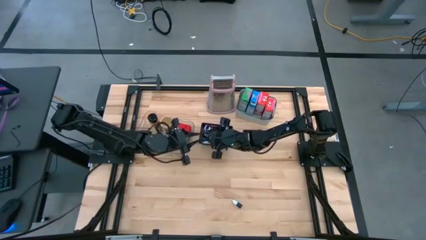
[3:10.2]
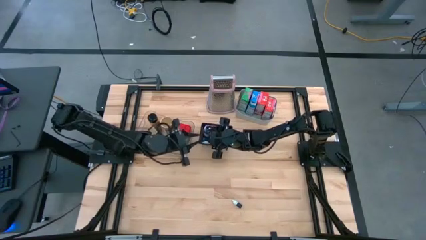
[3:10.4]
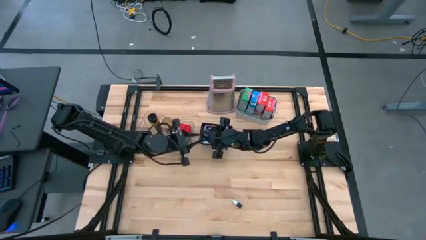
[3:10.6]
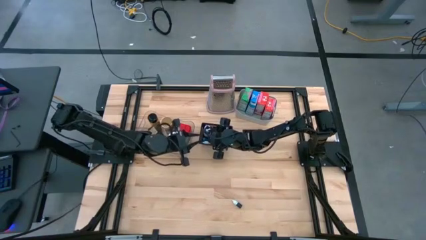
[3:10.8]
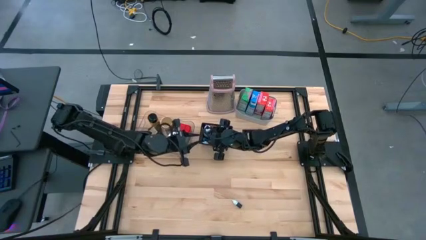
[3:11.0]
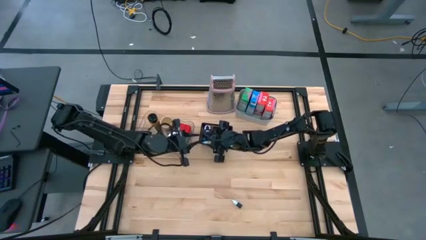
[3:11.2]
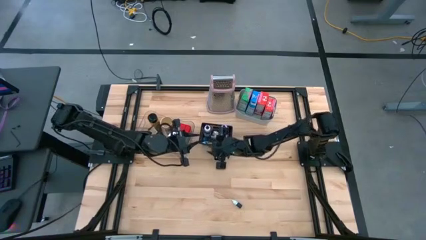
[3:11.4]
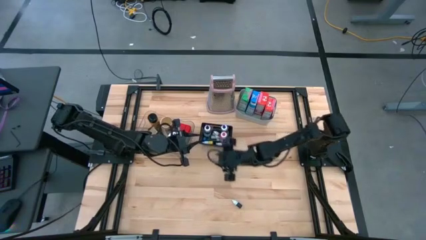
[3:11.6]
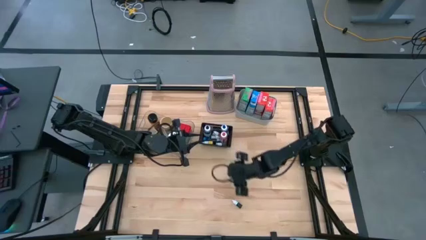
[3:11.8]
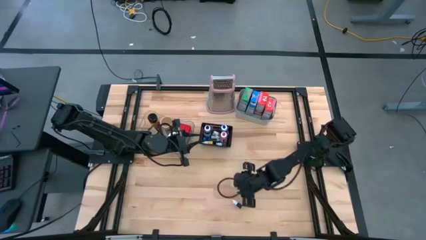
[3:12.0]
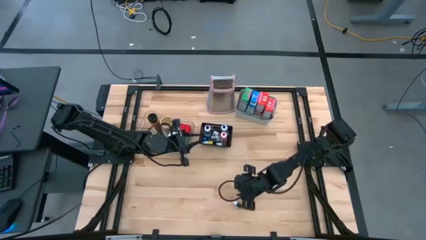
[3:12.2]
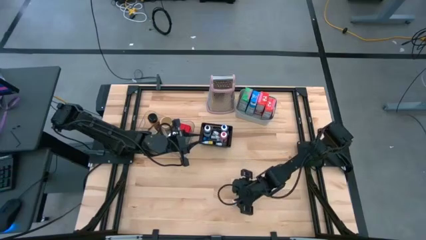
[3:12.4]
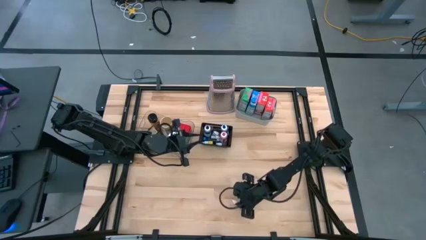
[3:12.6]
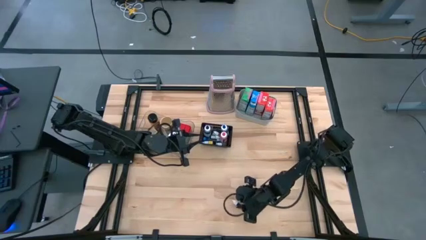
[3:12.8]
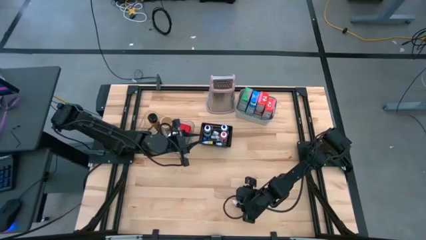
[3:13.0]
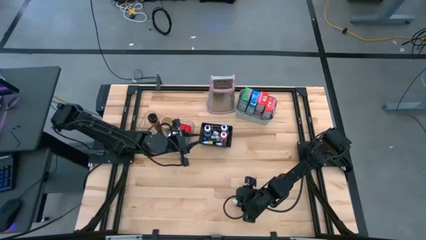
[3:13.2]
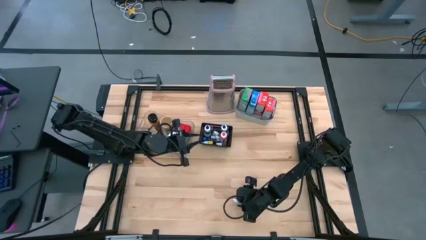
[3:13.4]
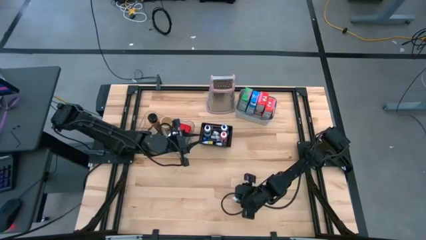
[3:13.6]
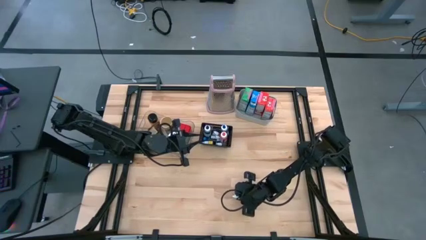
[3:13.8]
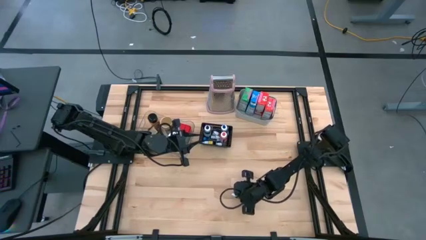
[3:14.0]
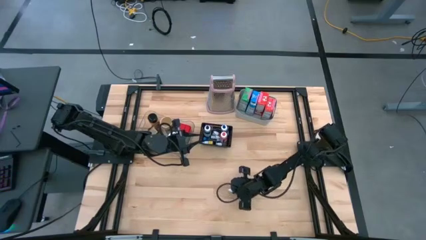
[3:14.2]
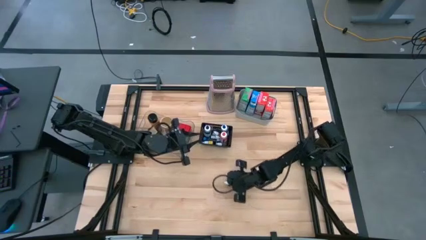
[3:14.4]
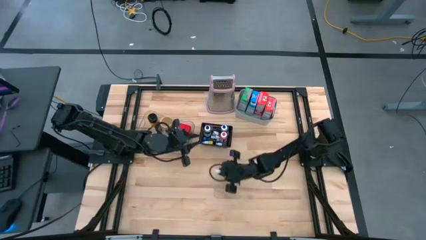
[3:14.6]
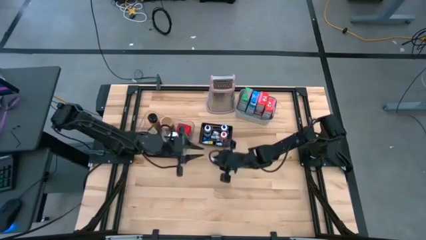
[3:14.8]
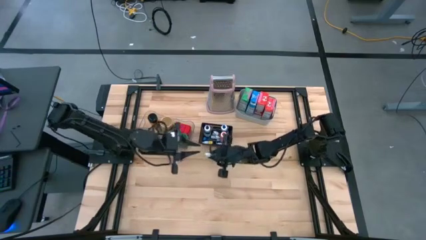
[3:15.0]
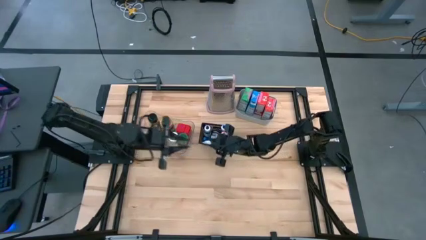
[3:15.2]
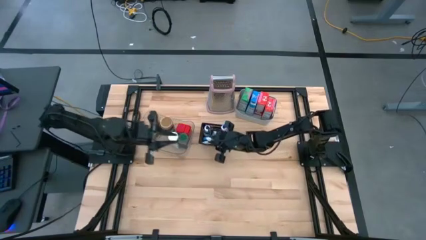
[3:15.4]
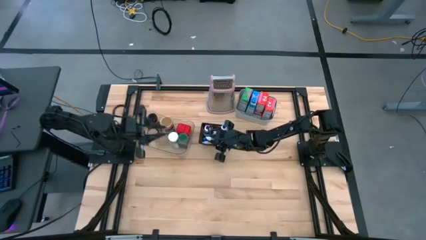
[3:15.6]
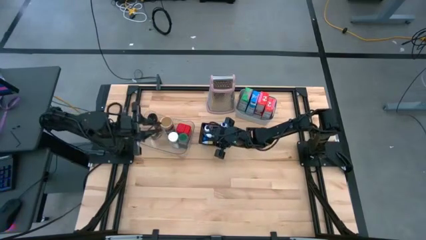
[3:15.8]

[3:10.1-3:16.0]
Task: Pick & Place Kitchen Items
Put the small green food coloring bottle into the black bin

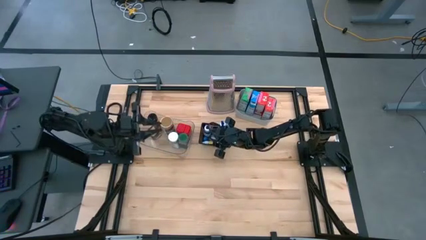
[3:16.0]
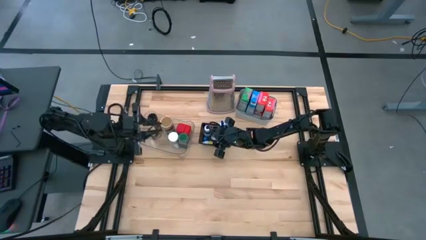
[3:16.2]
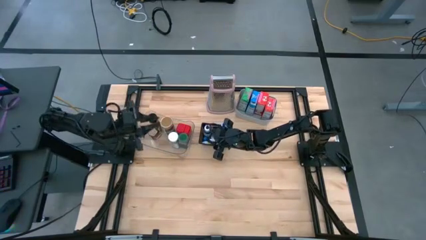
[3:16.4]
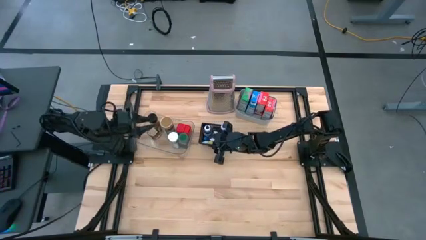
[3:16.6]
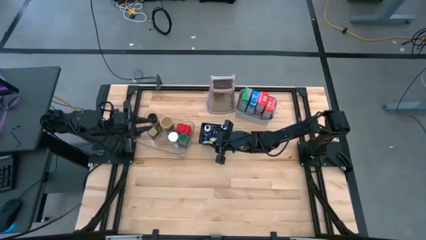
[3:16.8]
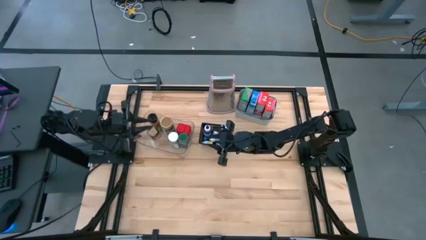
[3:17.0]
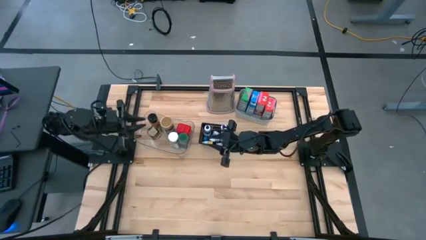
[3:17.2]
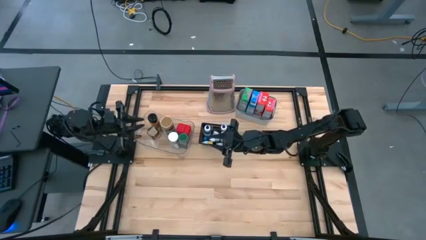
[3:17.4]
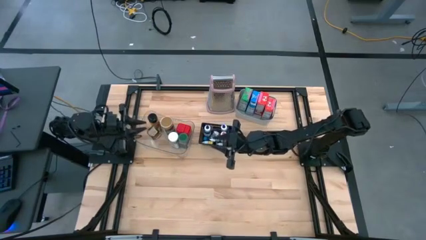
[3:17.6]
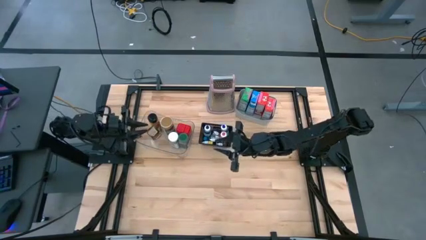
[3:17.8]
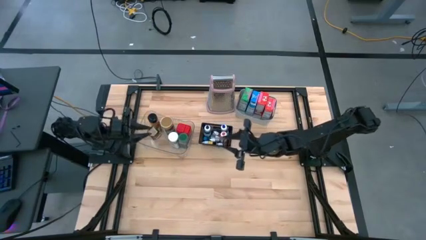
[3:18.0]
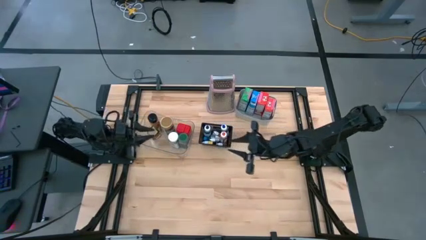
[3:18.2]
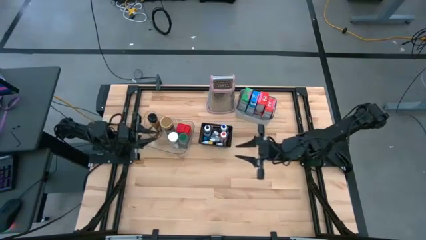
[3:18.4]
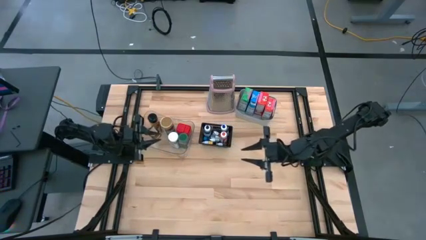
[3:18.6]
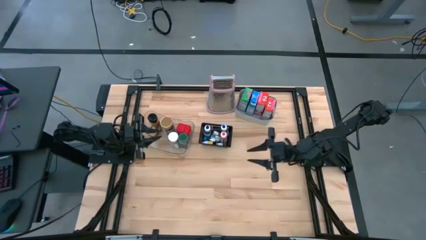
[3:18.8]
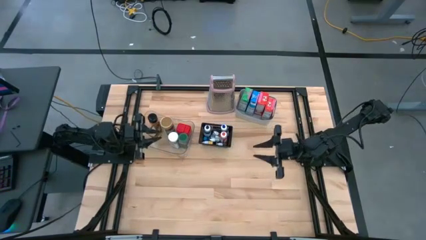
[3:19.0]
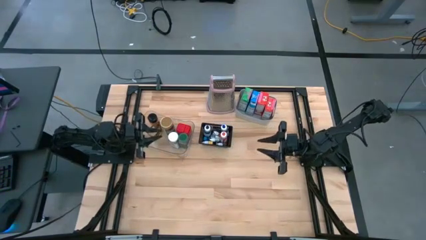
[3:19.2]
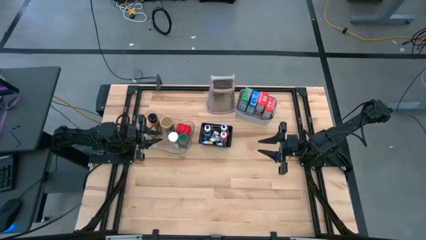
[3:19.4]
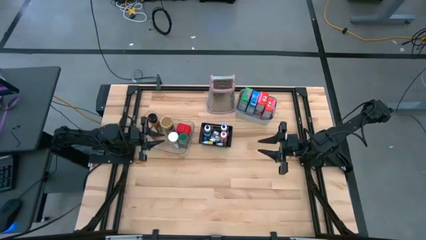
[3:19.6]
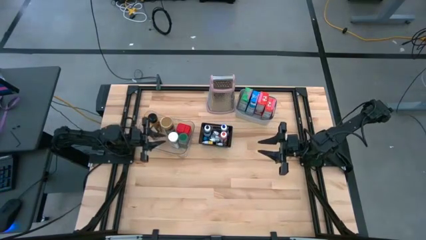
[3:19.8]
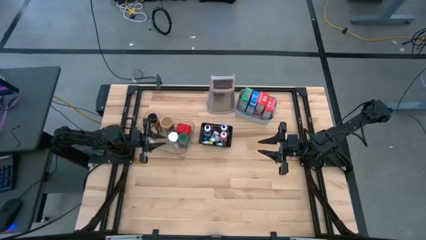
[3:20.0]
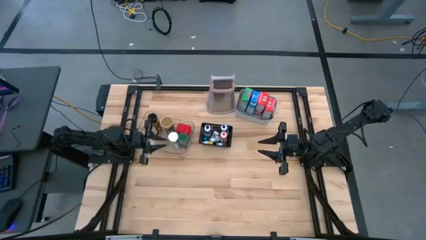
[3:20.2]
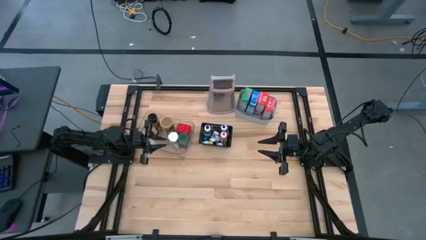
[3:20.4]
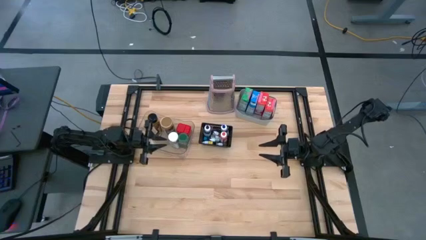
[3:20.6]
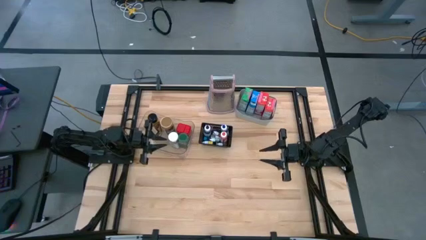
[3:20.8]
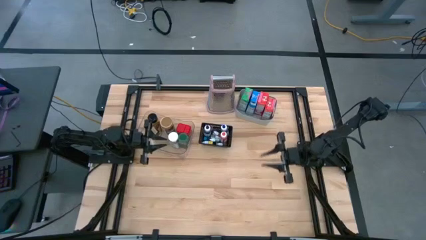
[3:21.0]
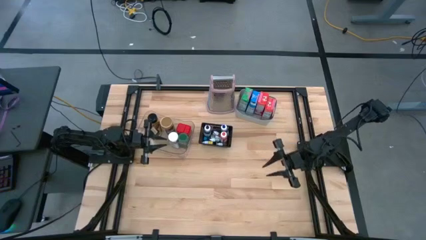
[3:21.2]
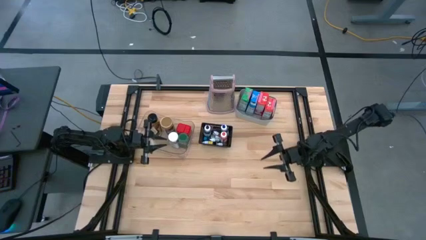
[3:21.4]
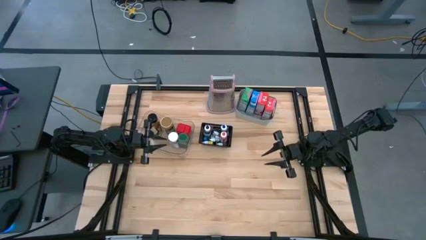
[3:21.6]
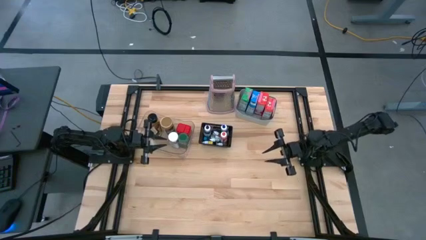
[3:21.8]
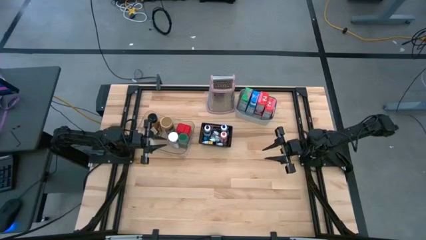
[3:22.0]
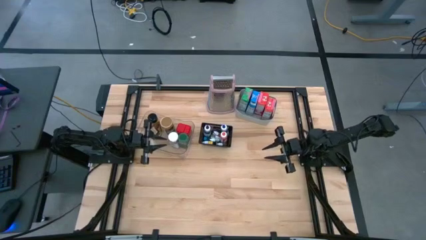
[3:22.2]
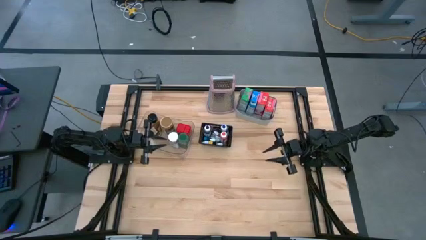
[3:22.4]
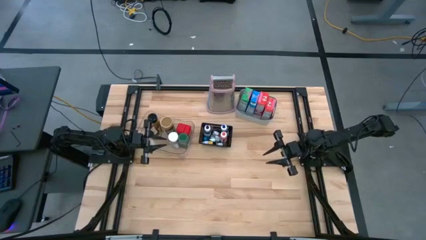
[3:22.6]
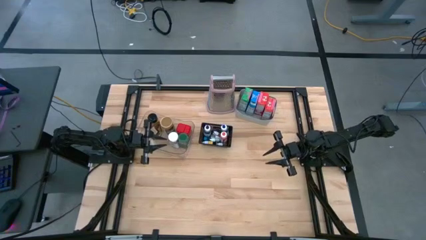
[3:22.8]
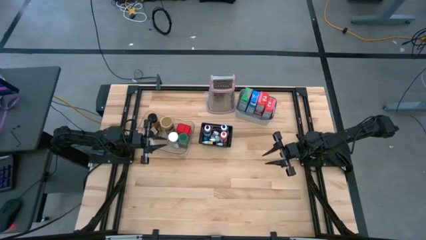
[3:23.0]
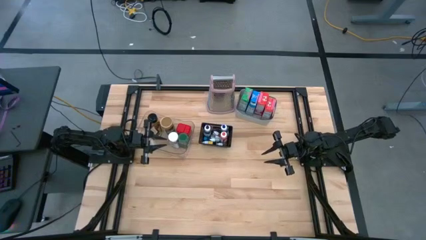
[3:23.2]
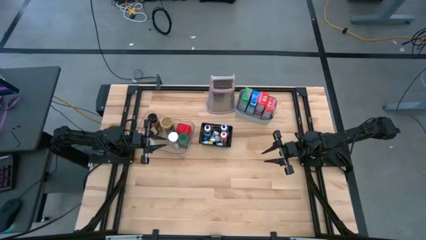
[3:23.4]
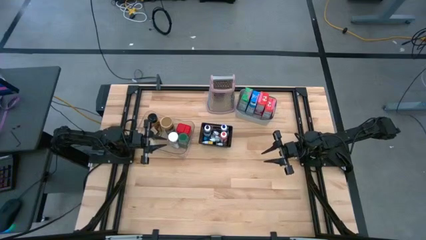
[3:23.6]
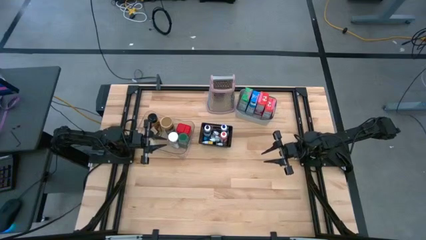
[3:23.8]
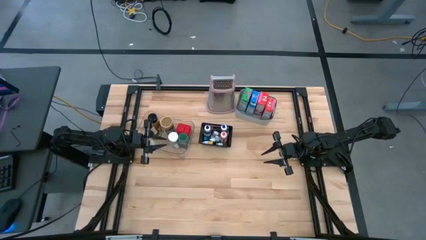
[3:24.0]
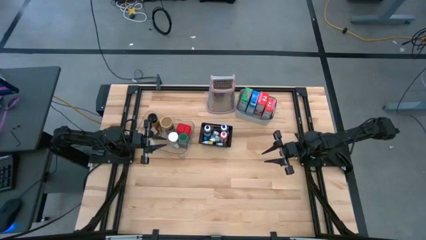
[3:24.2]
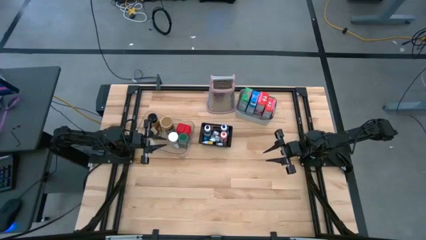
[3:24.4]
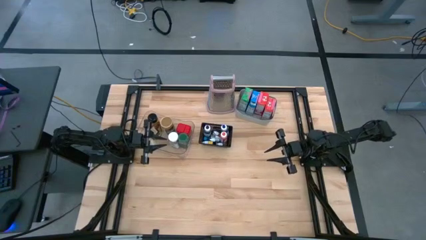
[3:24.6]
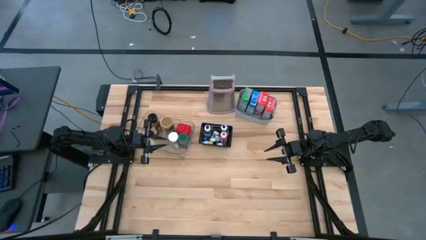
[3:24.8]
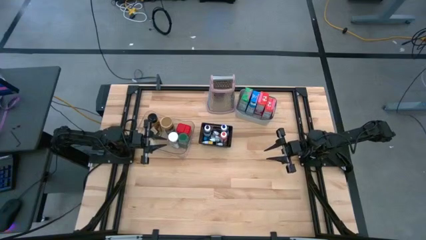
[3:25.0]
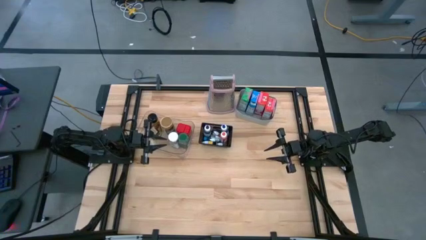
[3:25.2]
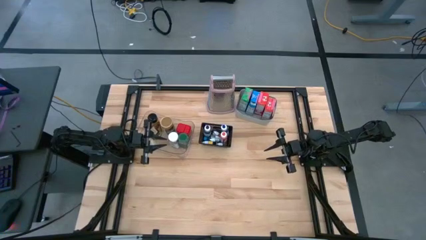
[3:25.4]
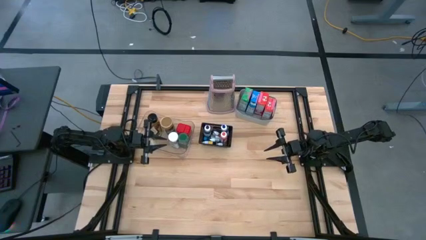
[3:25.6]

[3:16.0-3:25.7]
Return to Home Position

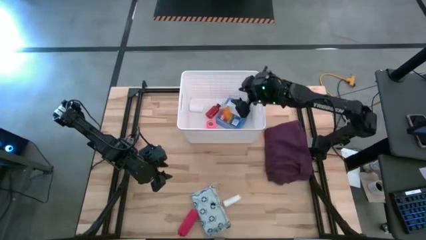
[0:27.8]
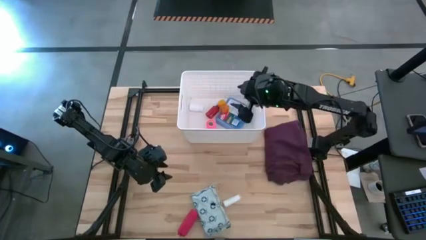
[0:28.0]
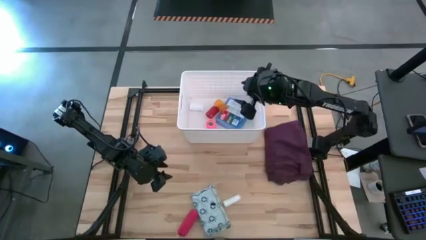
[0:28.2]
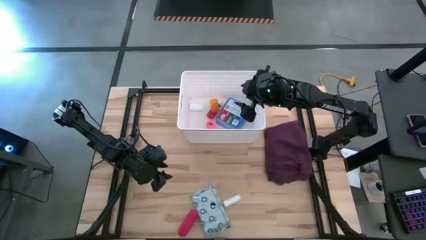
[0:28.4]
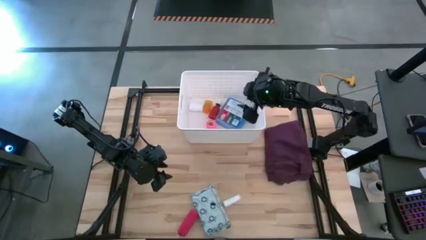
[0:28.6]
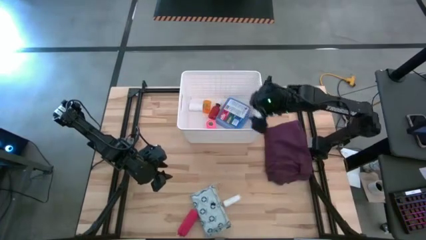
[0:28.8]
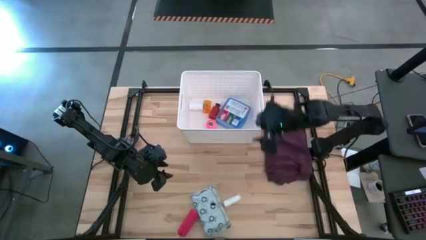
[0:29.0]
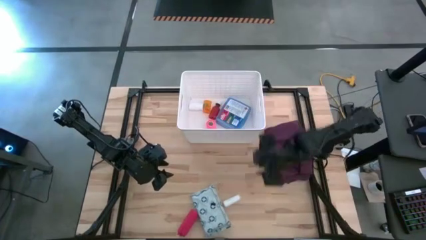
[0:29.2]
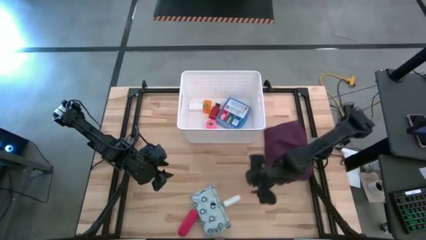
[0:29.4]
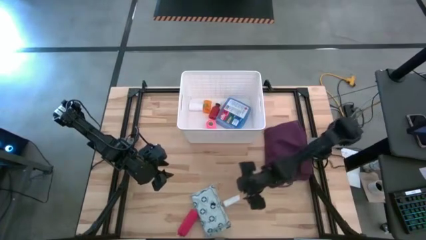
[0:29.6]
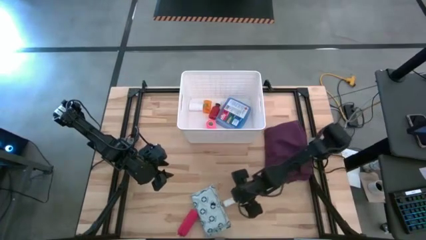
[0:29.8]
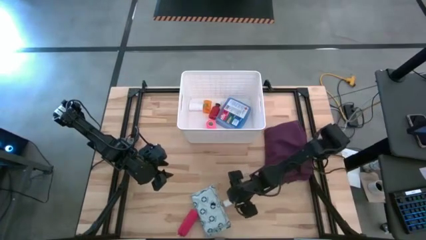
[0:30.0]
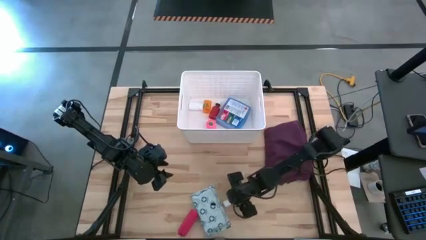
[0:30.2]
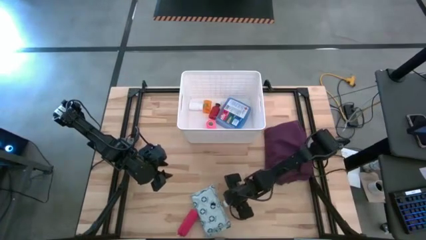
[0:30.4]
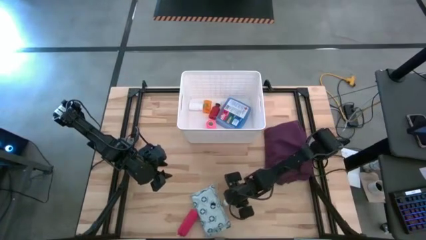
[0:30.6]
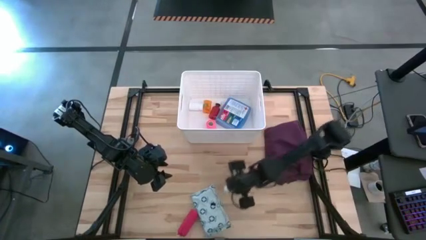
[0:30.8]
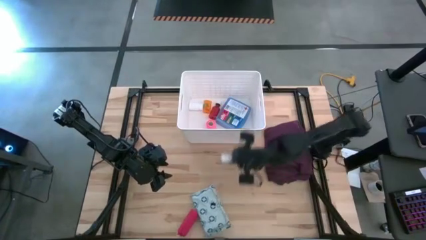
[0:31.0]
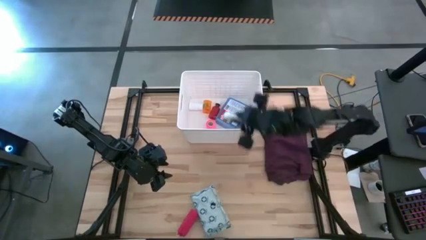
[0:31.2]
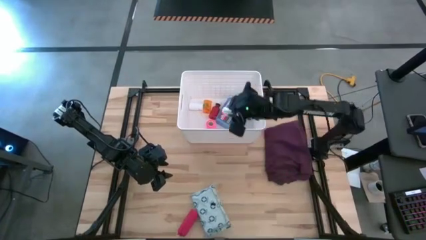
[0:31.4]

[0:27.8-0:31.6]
Task: Pick & place medical supplies in basket/bin
Put the rolled gauze into the white bin
